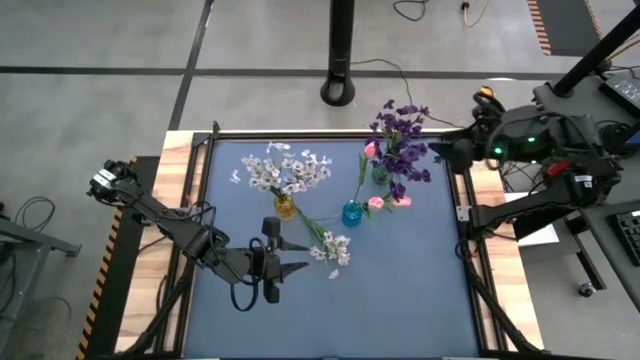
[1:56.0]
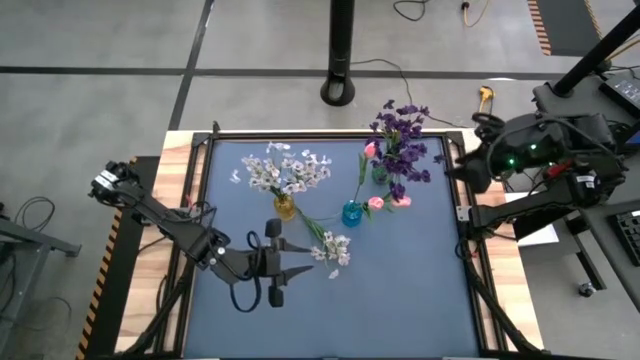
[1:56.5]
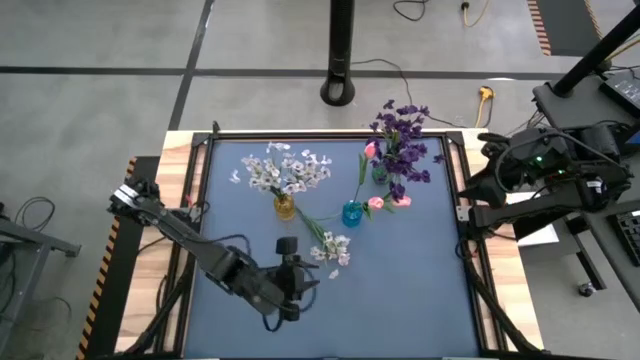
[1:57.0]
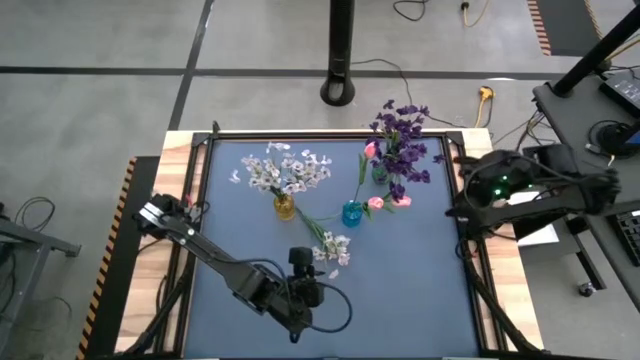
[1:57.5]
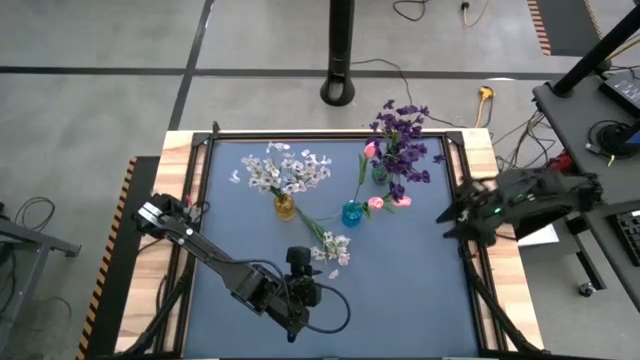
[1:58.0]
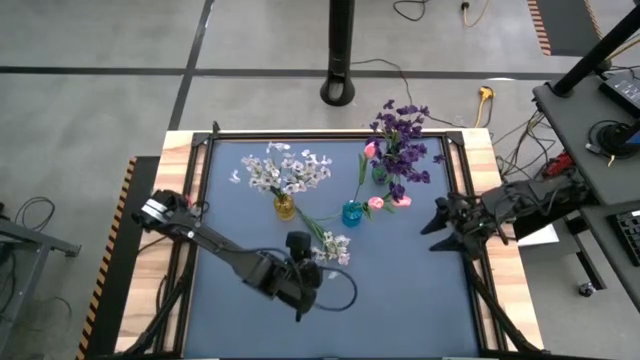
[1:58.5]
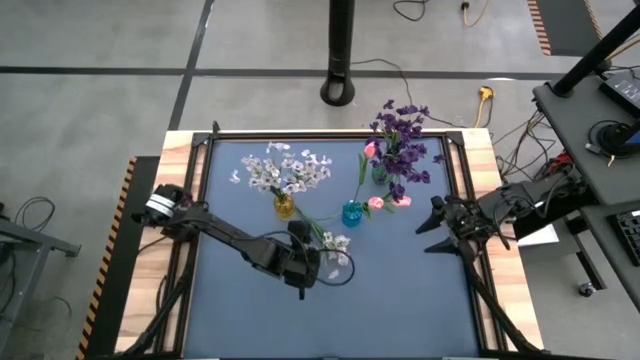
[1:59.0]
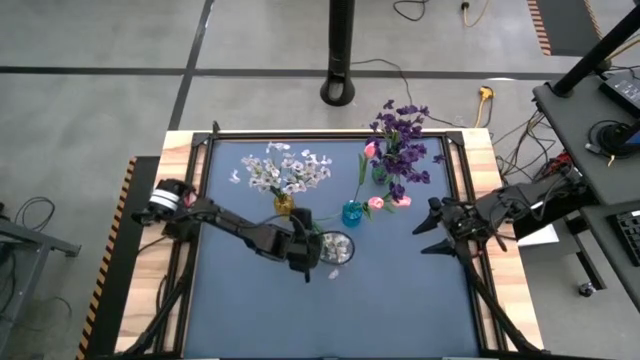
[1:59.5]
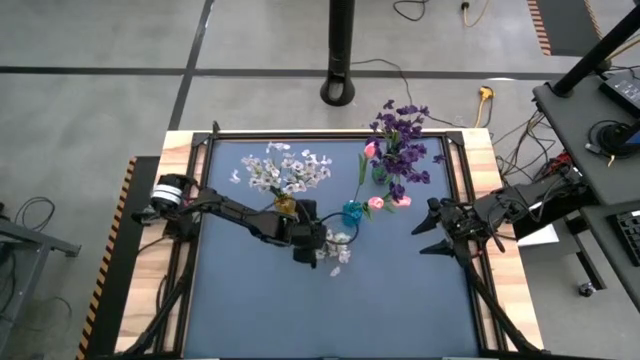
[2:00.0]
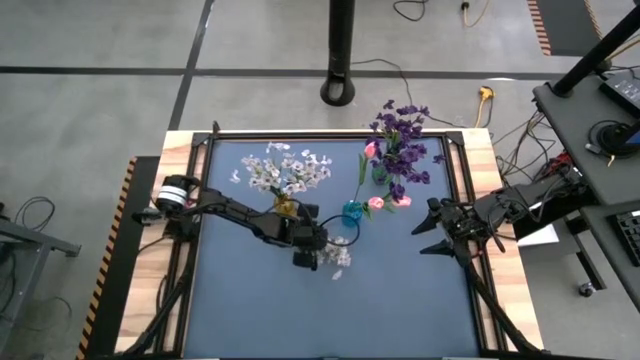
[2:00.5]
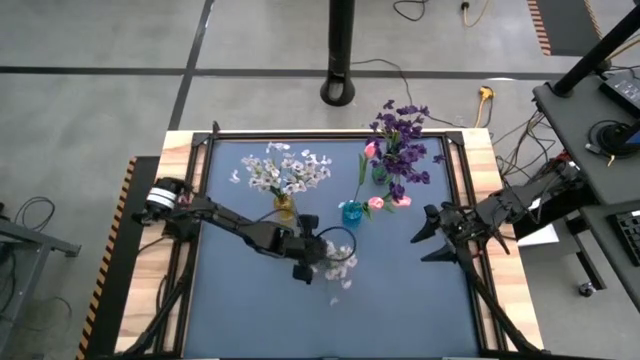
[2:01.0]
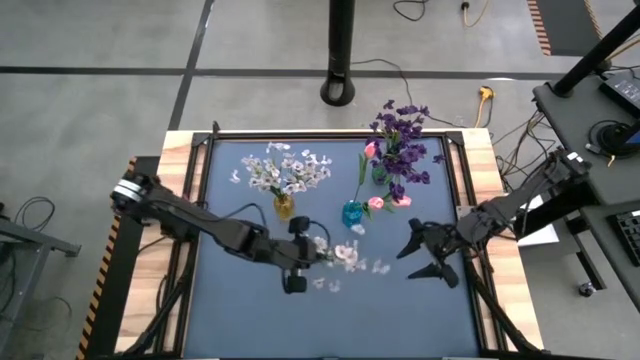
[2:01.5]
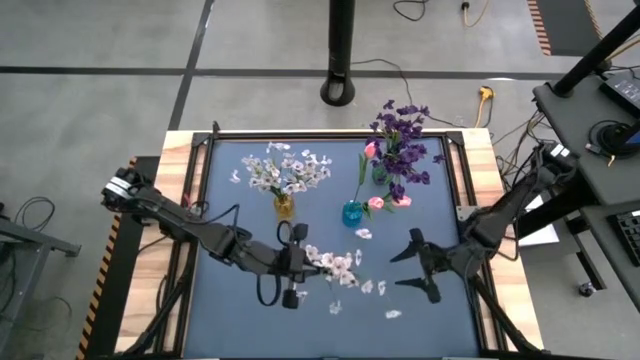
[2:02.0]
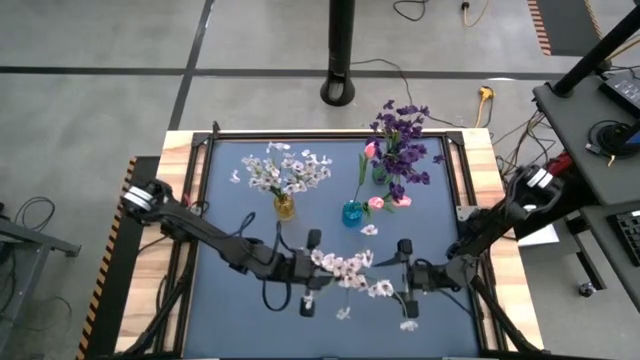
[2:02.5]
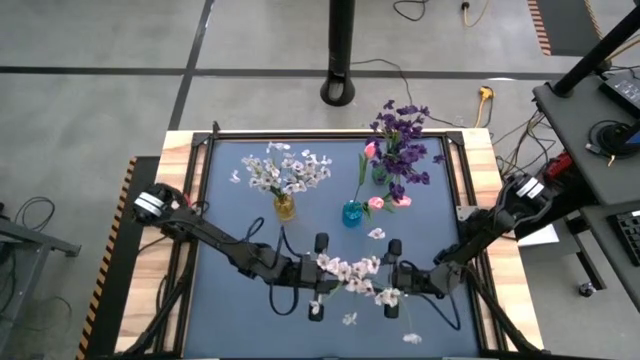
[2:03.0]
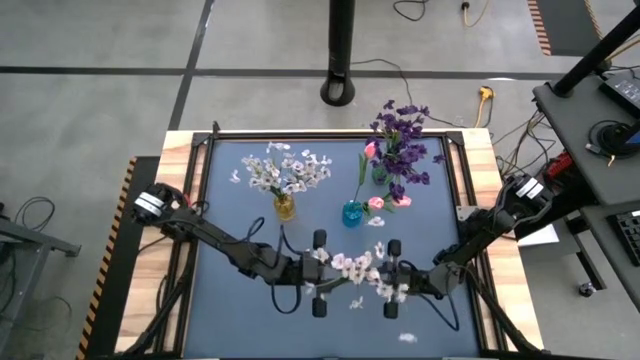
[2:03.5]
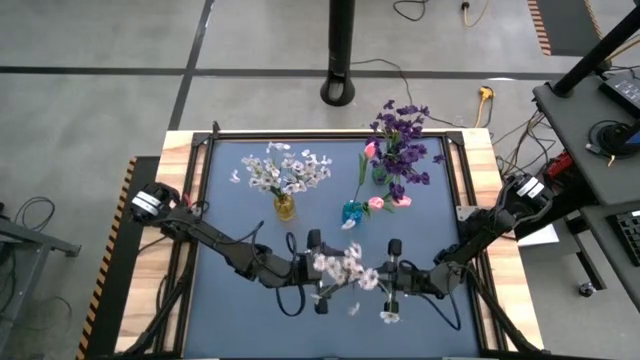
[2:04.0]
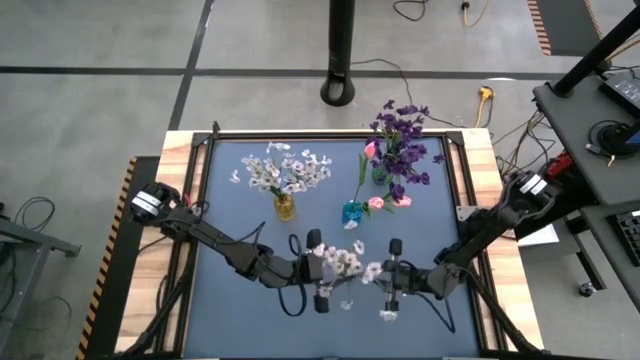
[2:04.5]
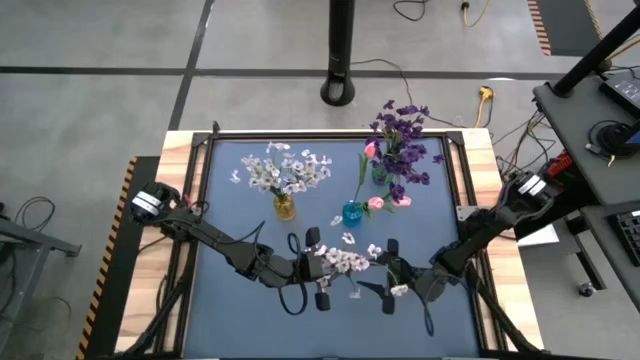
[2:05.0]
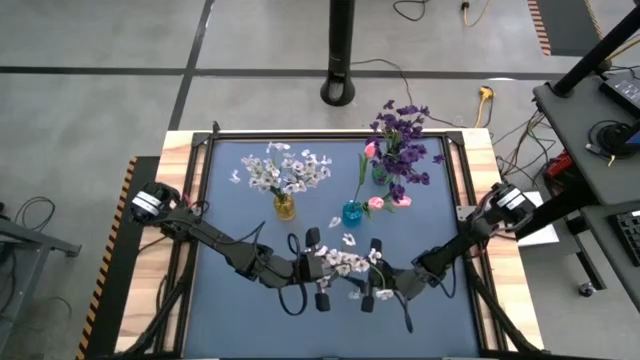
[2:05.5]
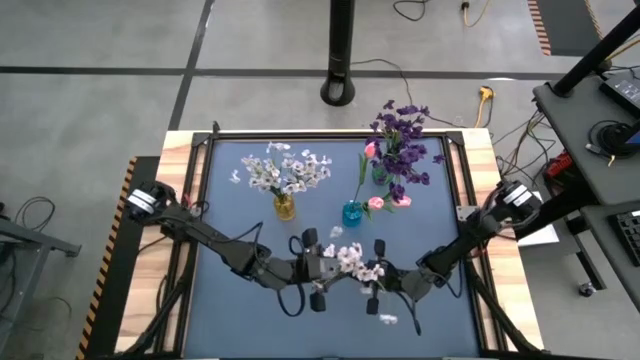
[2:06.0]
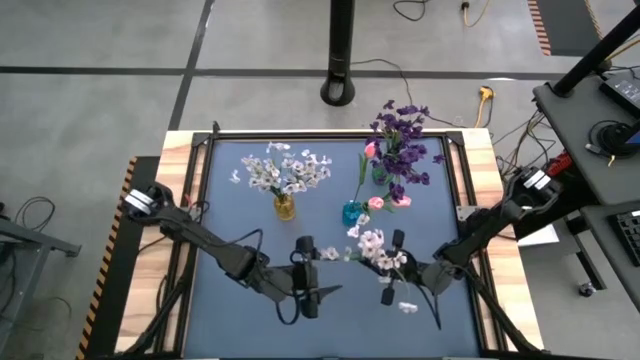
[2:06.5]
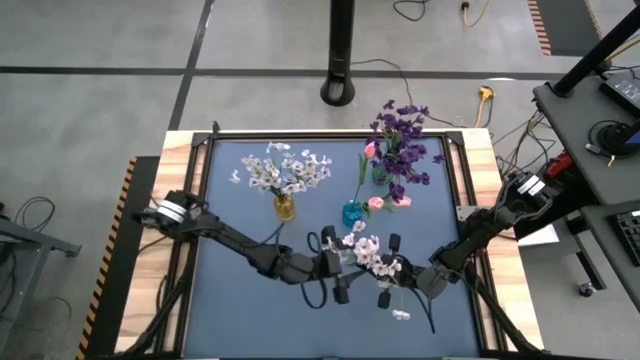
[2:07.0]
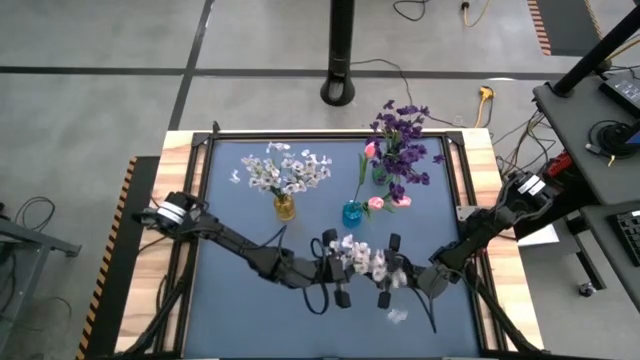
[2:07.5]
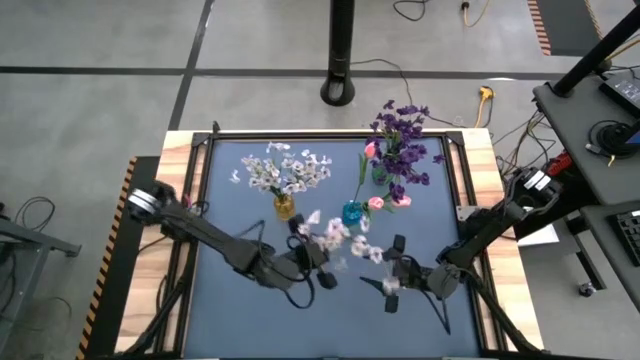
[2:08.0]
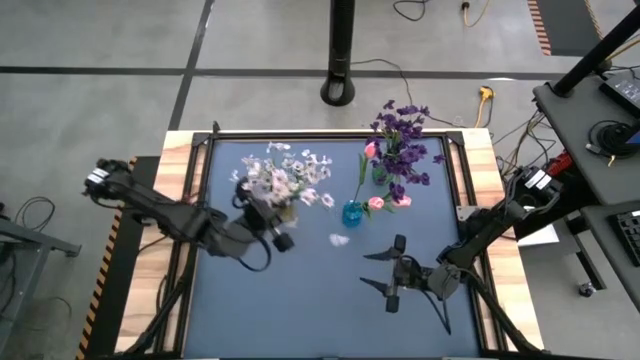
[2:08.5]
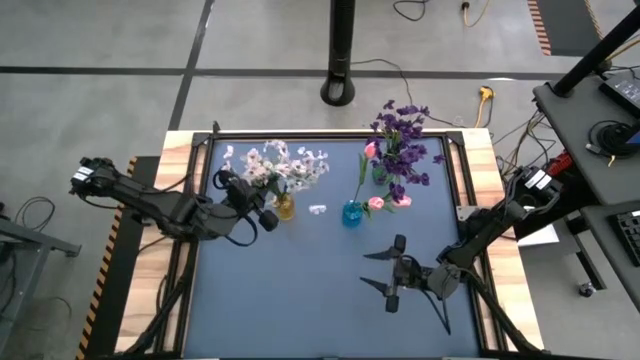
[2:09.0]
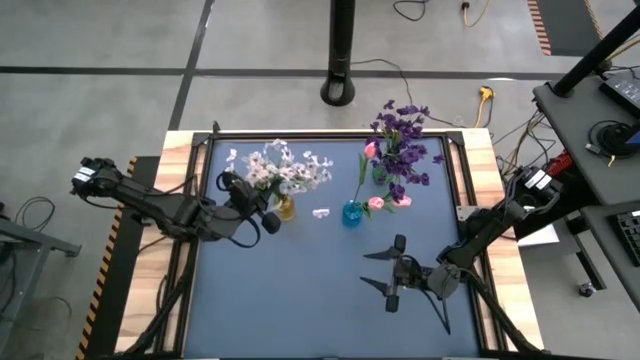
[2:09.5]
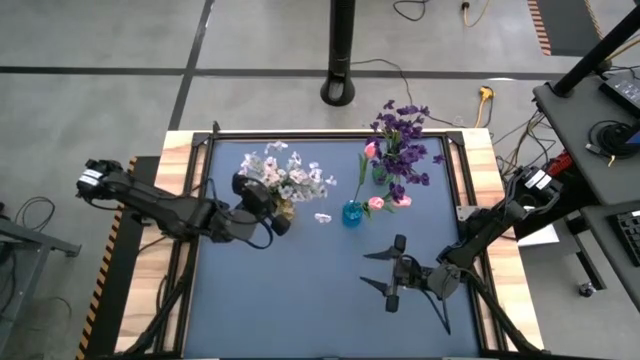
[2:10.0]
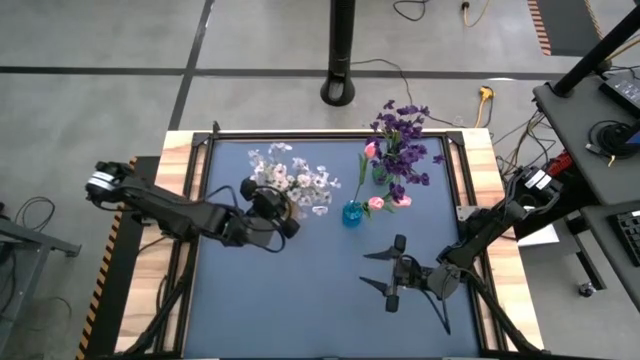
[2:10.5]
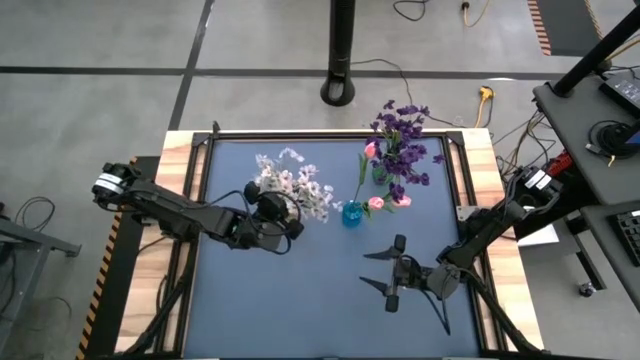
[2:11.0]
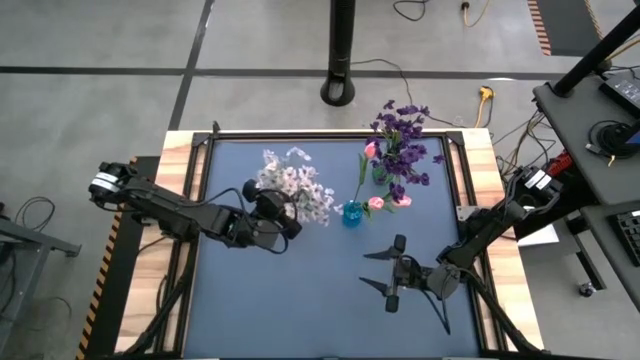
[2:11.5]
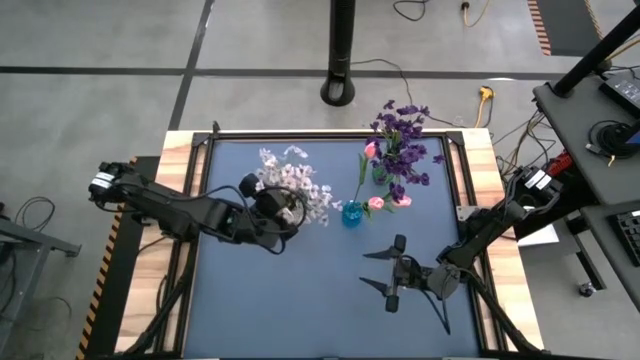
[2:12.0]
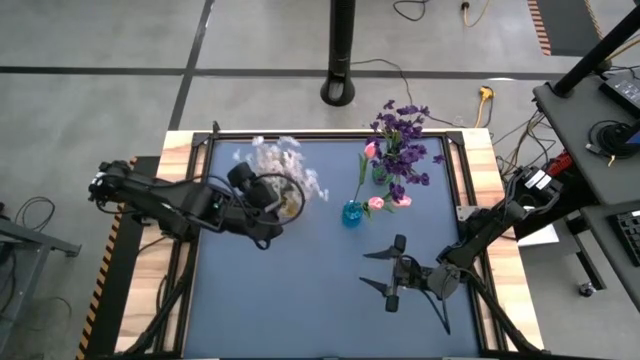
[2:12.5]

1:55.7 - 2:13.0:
Task: Sort flowers into vase by color
Put the white flowers into the yellow flower vase

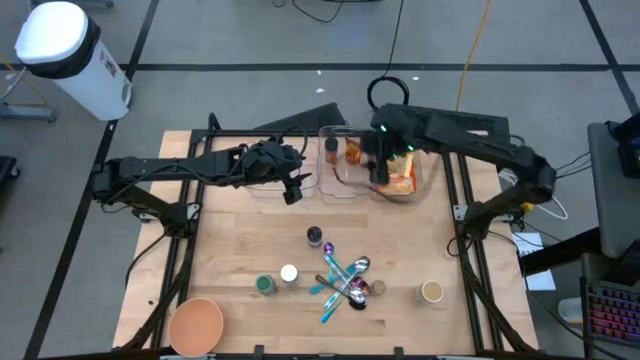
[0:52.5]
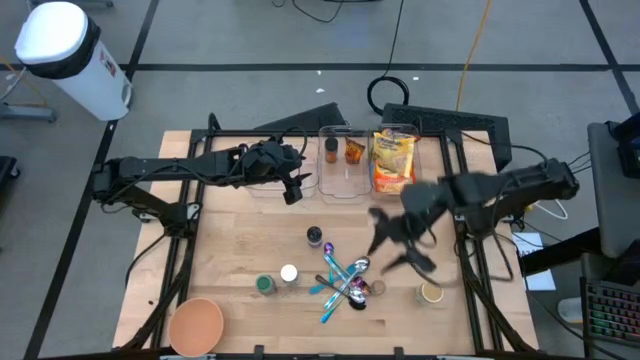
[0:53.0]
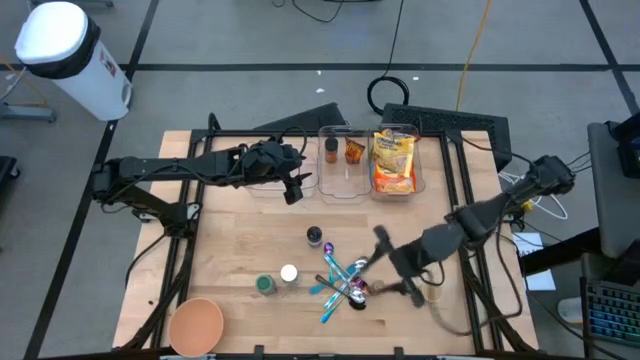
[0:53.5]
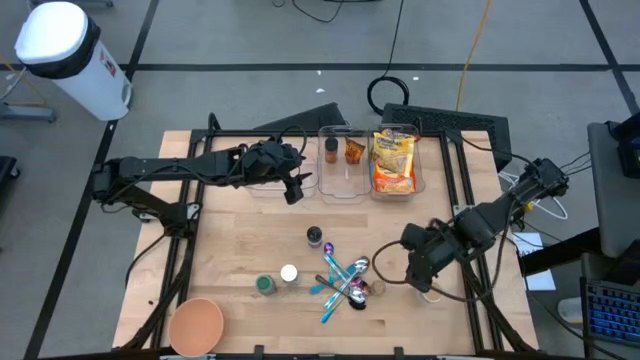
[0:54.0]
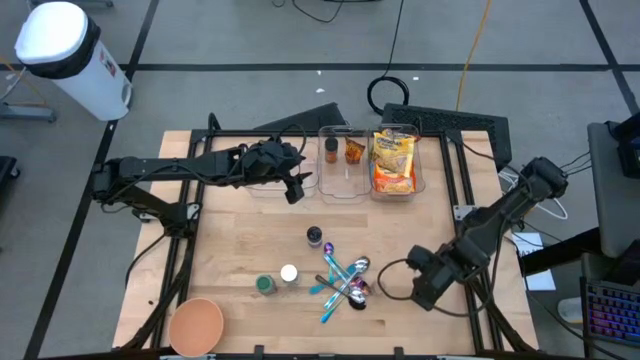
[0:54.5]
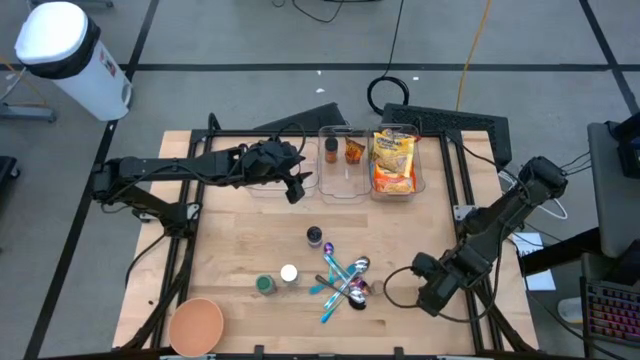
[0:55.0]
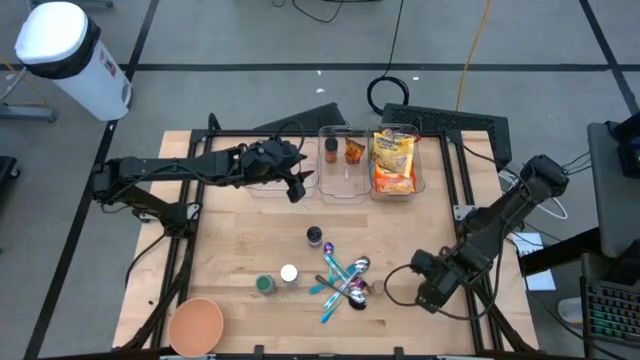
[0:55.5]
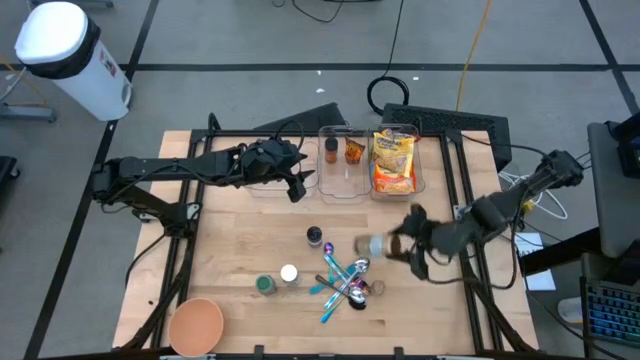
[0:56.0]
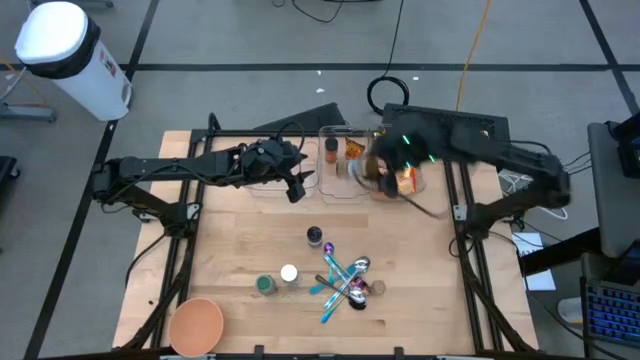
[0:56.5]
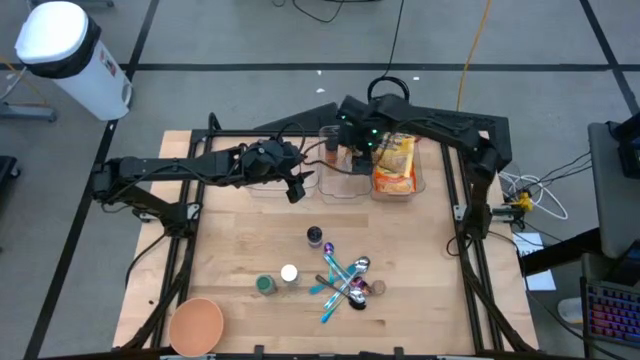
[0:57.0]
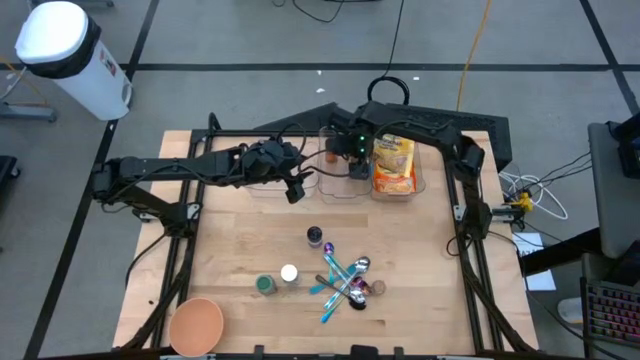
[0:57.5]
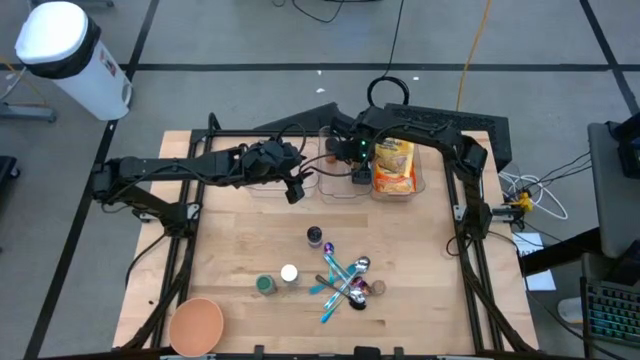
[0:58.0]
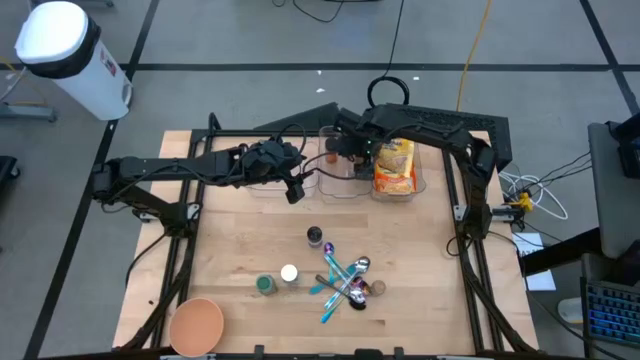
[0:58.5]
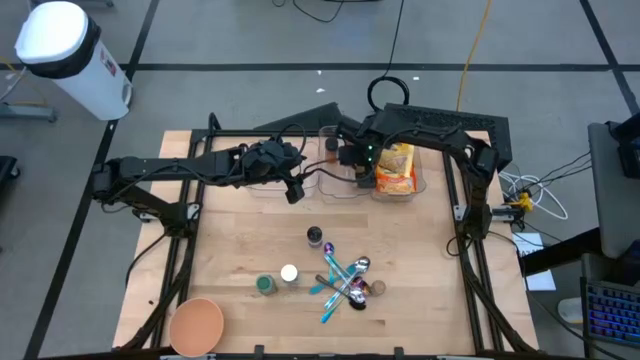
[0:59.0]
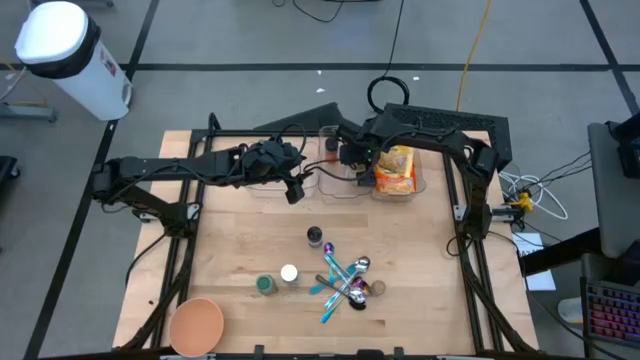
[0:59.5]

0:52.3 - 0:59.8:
Task: Pick & Place Food Item
Put the gold seasoning bottle into the middle transparent bin
